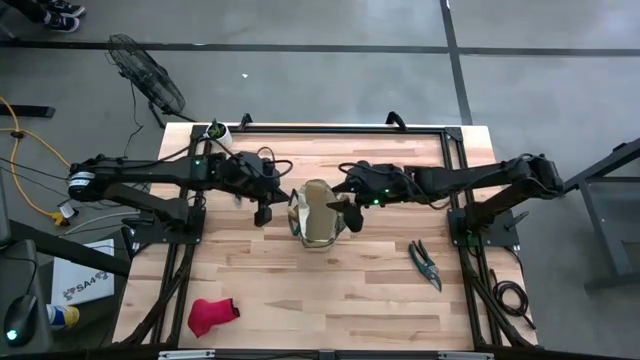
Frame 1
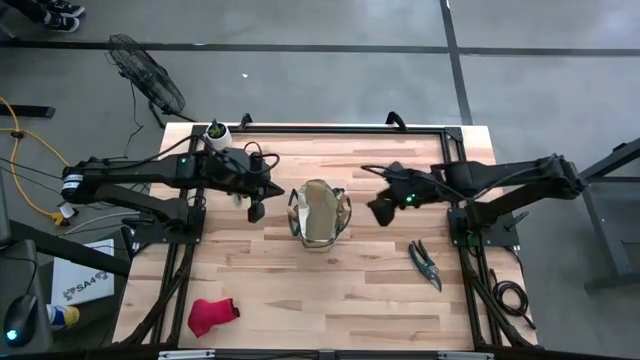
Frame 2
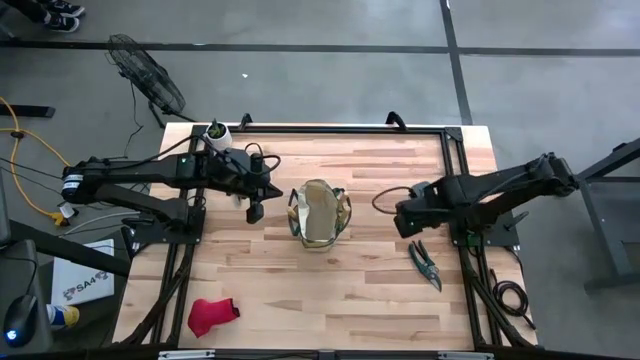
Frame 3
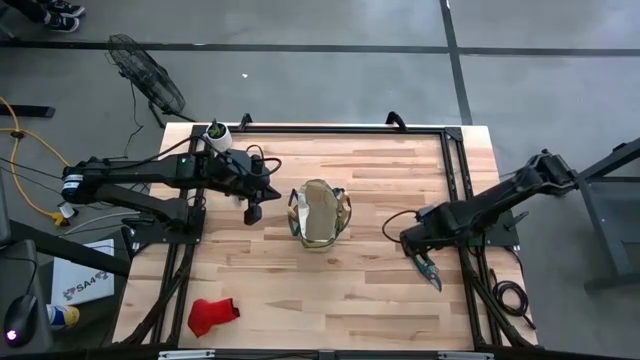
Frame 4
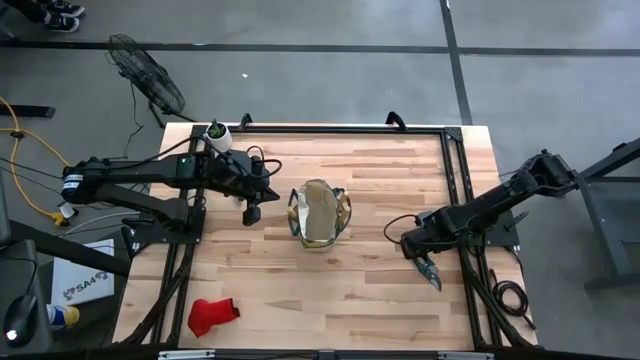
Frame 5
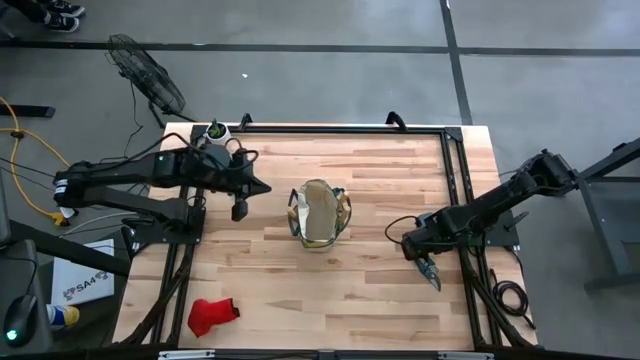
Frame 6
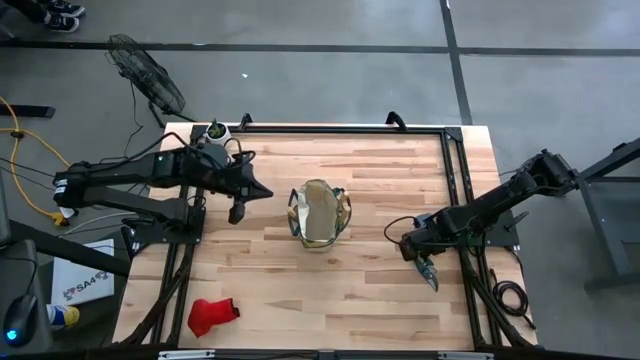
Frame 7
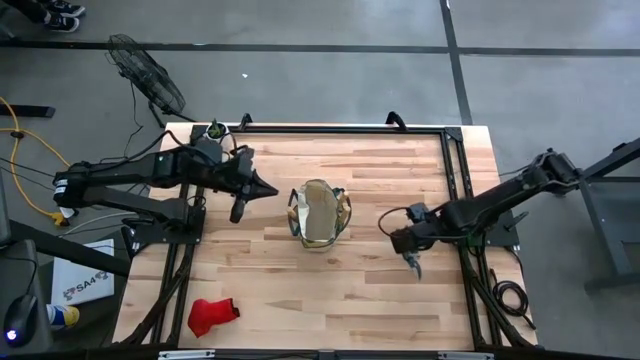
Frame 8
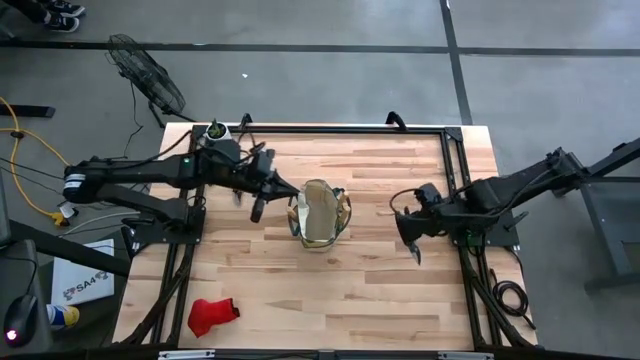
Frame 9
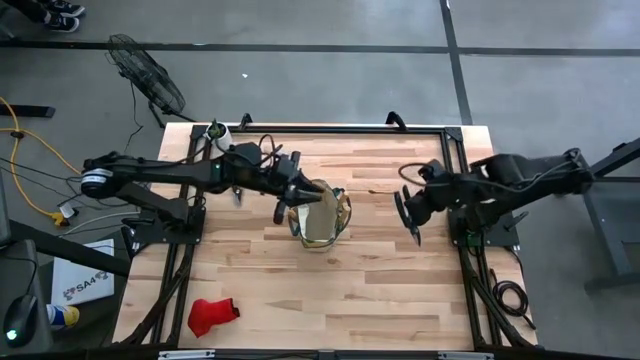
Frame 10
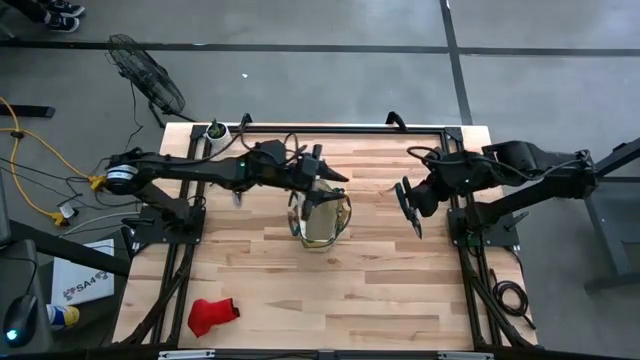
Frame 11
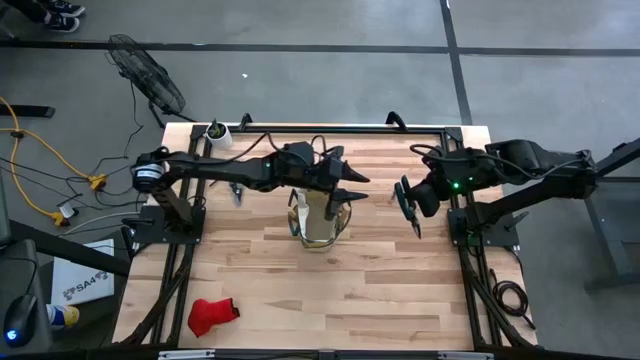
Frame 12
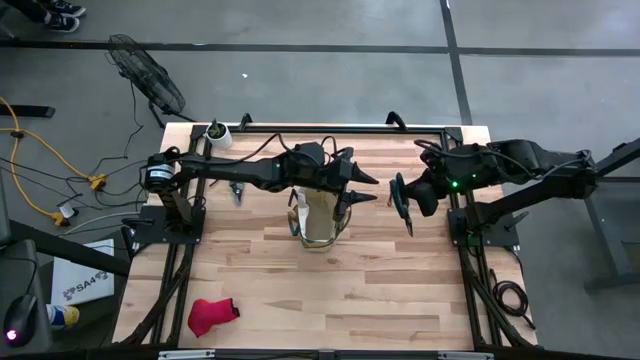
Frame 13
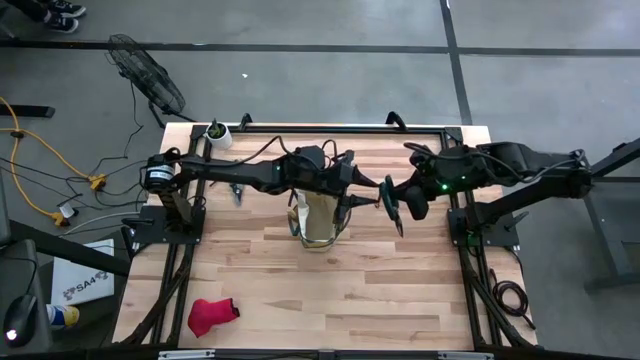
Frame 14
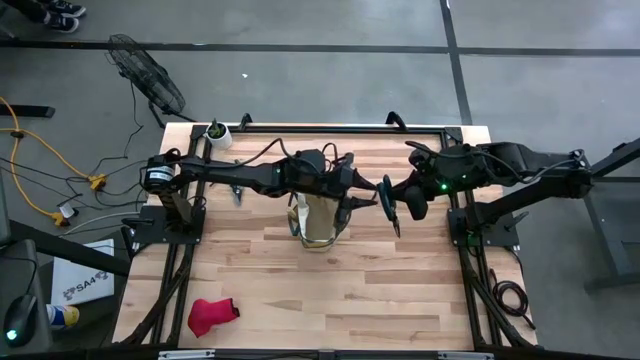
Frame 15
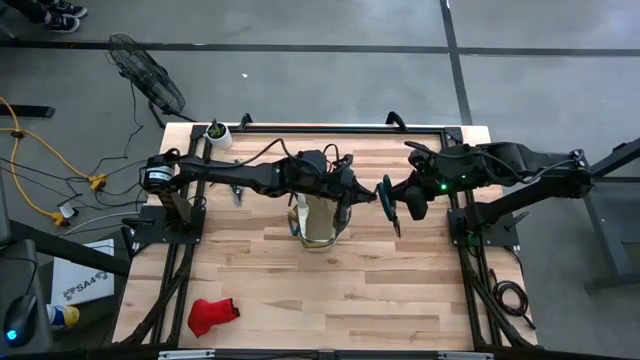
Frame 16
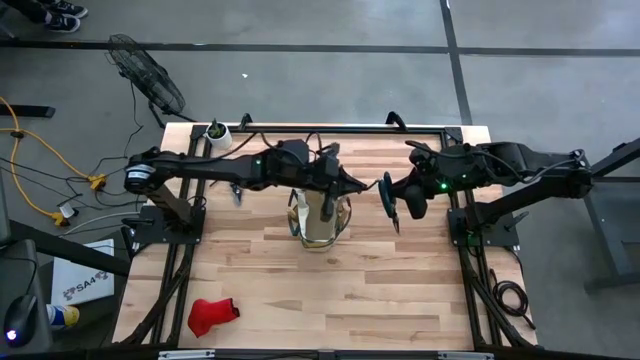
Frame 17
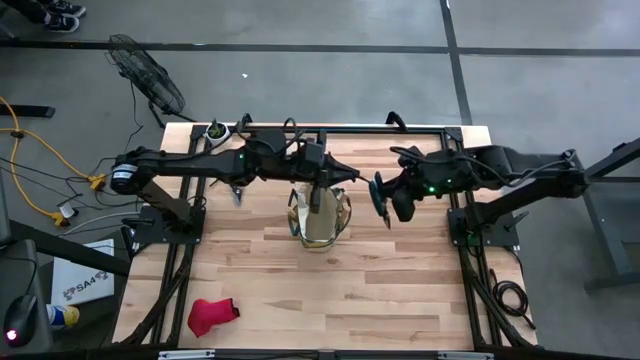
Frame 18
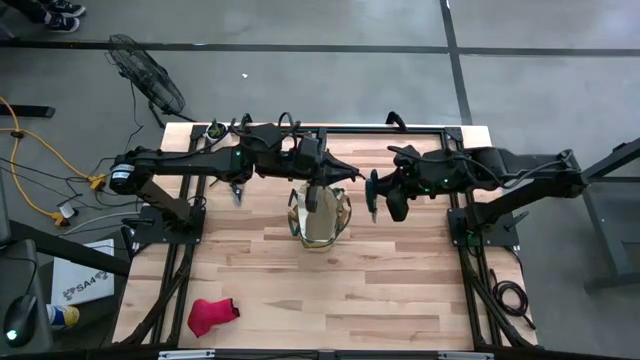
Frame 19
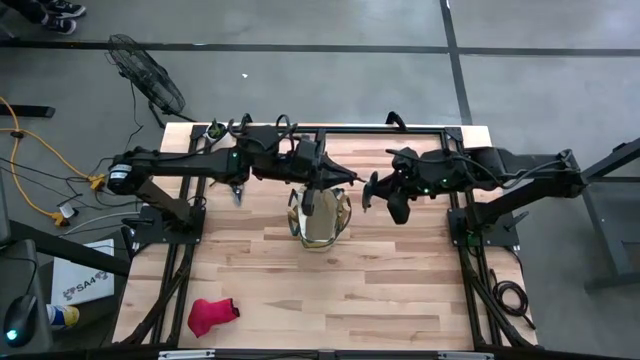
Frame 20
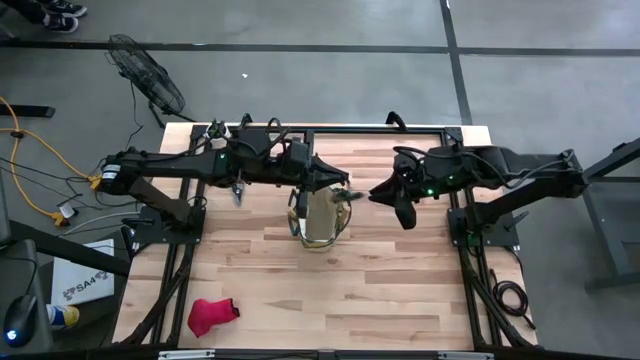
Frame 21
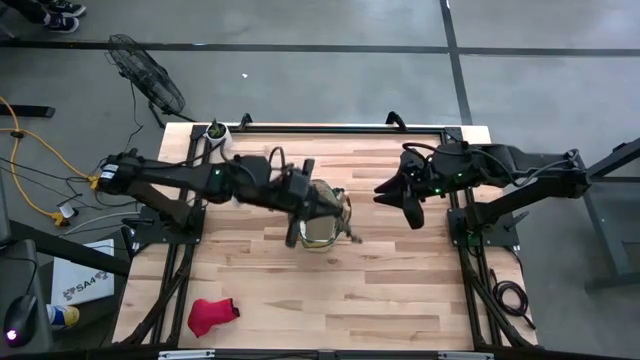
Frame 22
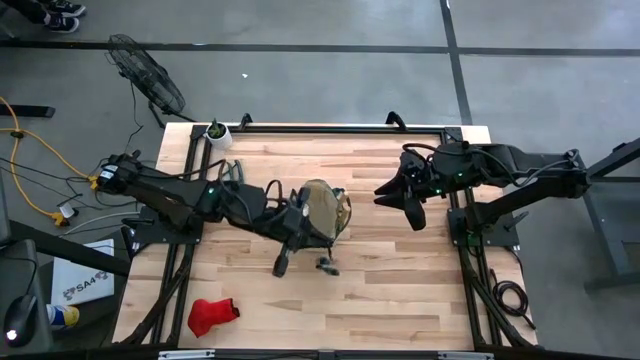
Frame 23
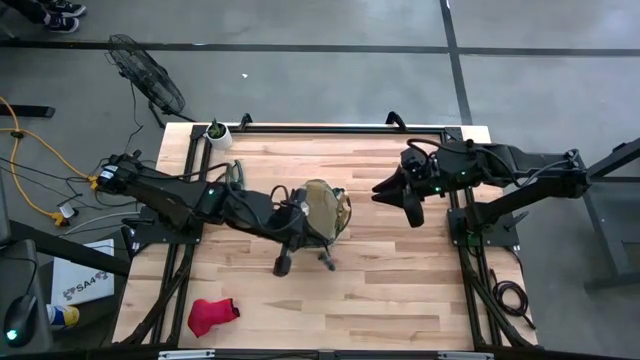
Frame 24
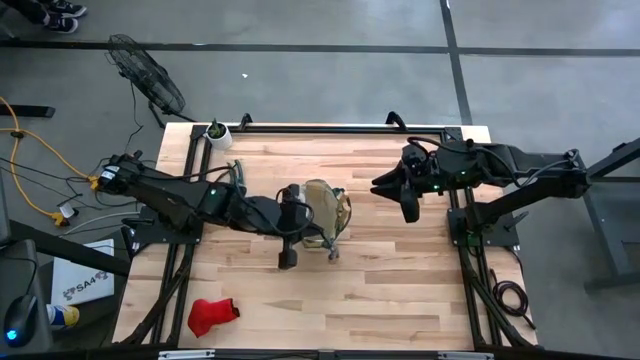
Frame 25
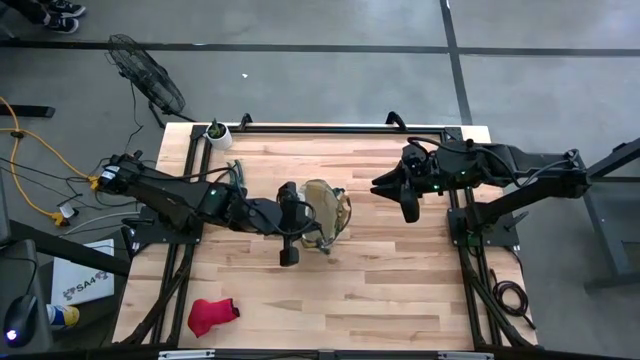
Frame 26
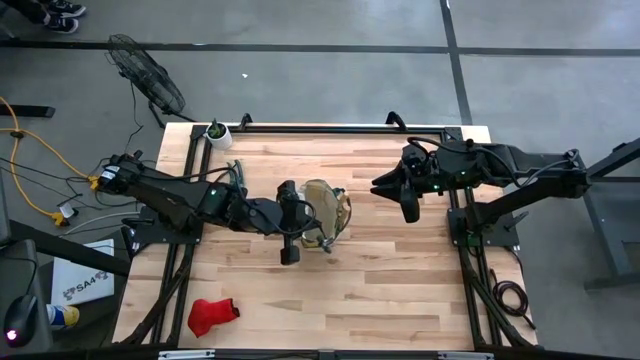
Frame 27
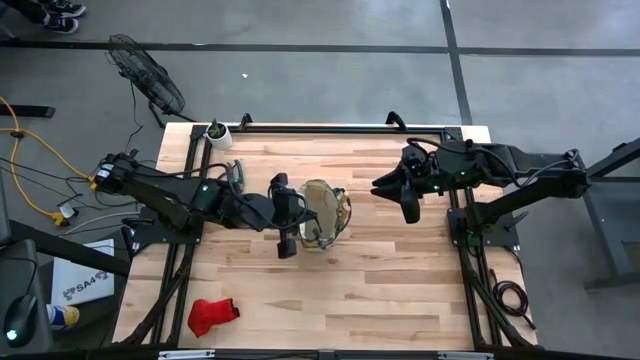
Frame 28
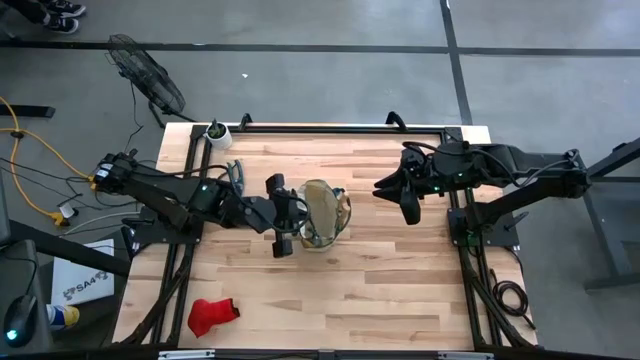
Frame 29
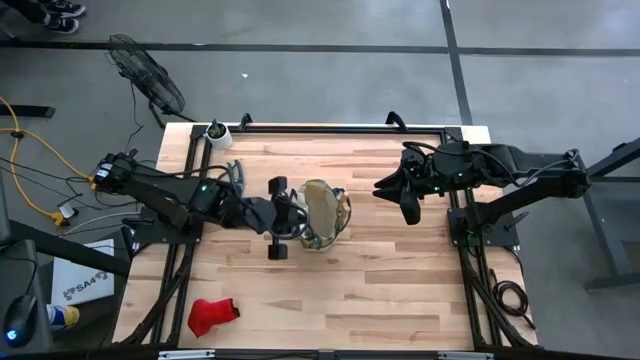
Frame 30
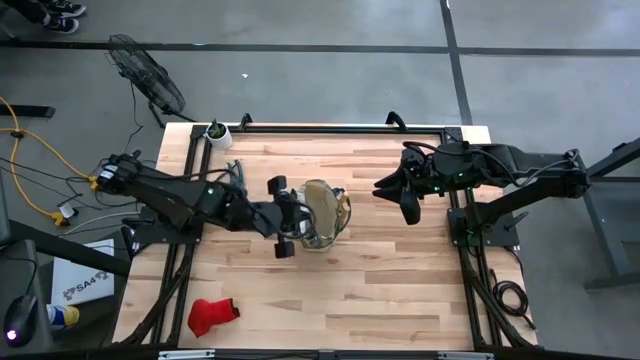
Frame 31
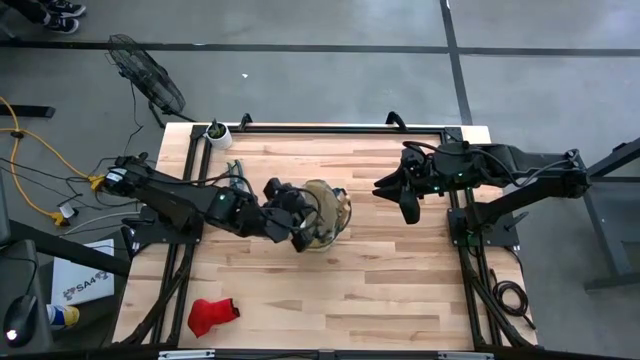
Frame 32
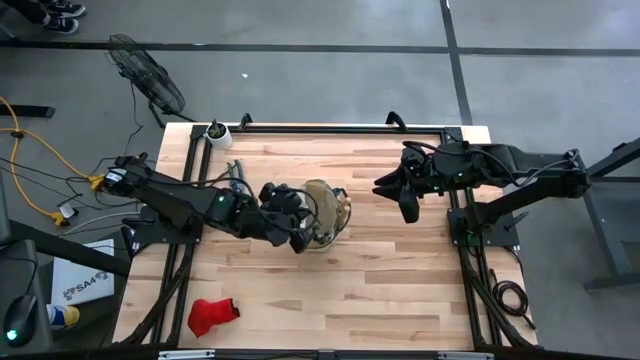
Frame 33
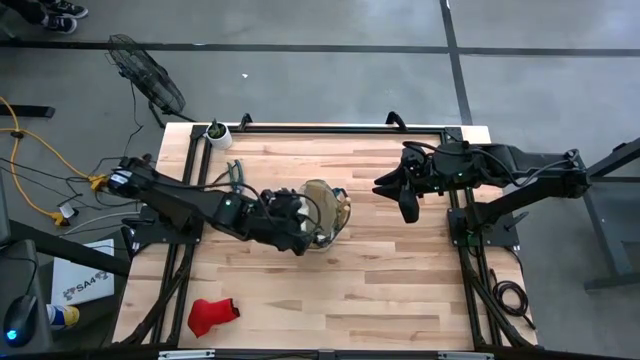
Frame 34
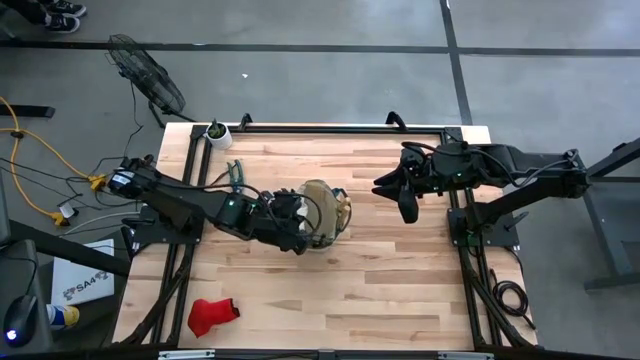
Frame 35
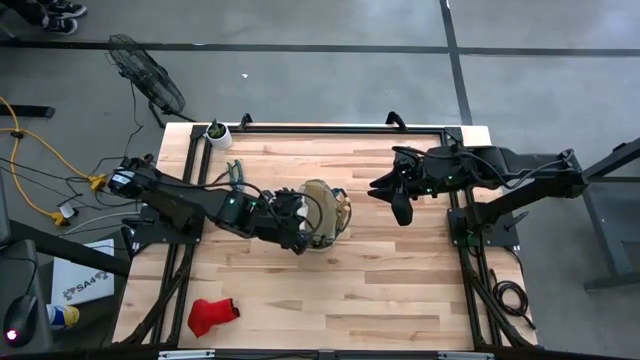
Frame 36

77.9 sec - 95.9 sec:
Task: Pick & Place Garden tools in Gardening bag
Put the right shear scissors into the gardening bag

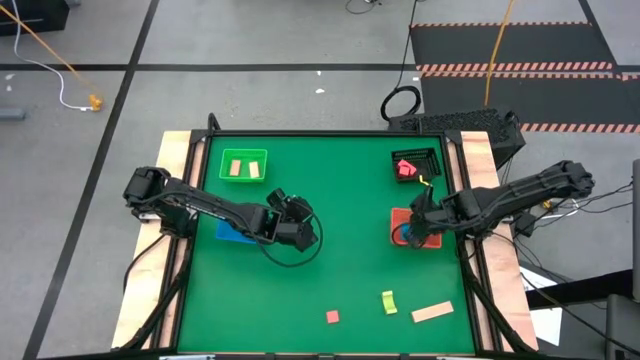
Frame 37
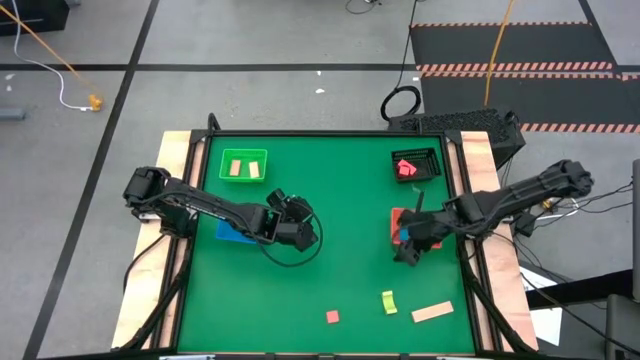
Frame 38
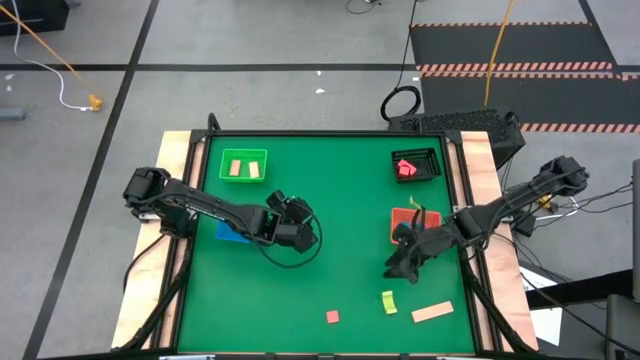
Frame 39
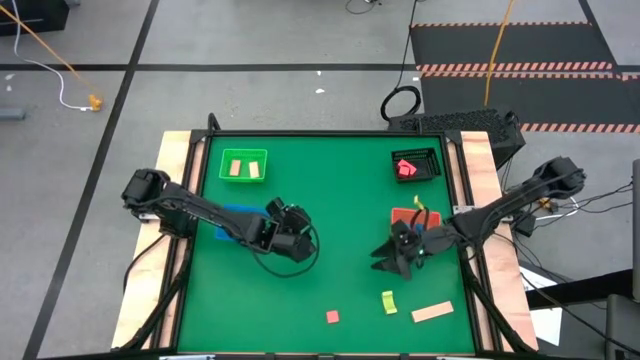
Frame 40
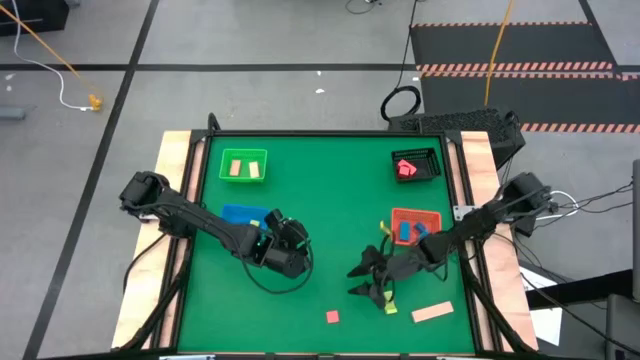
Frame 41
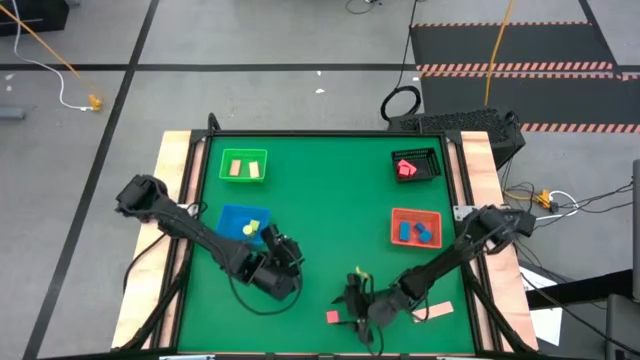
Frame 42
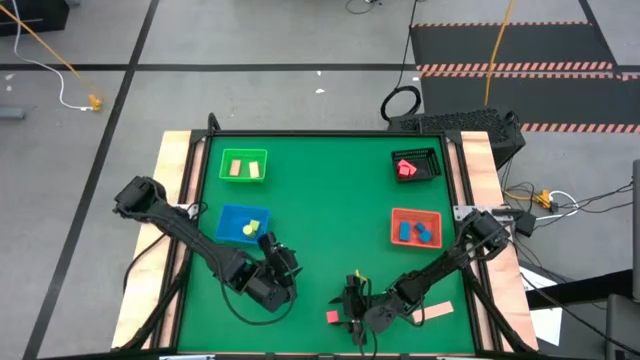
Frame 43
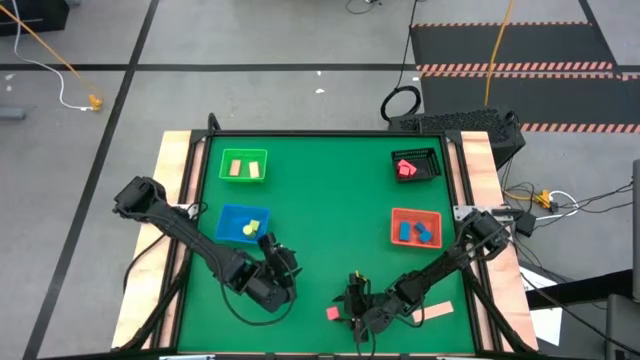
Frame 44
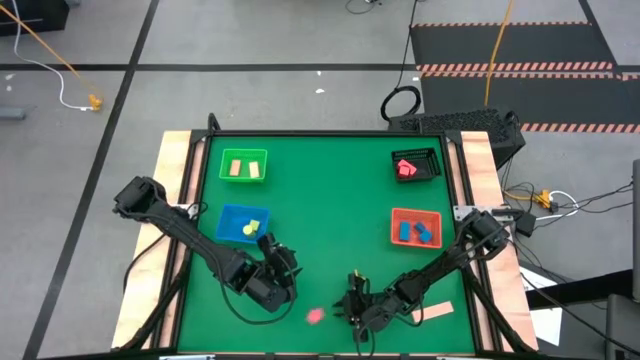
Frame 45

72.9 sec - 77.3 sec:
Task: Sort & place blocks by color
Put the orange block into the black bin
